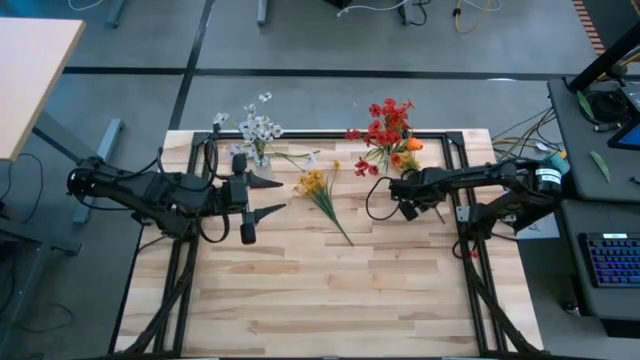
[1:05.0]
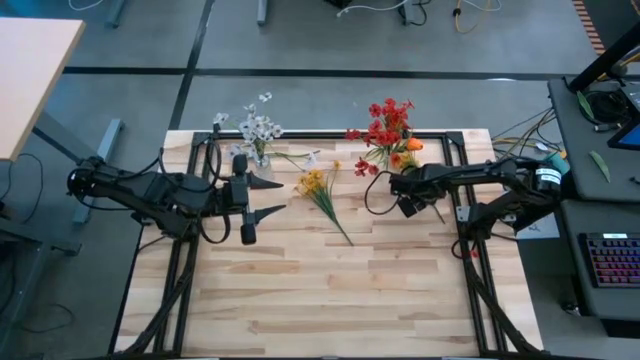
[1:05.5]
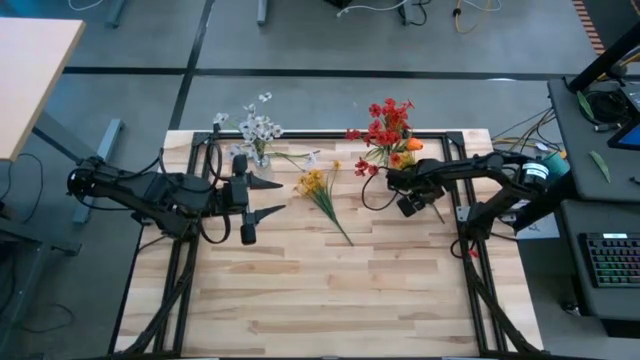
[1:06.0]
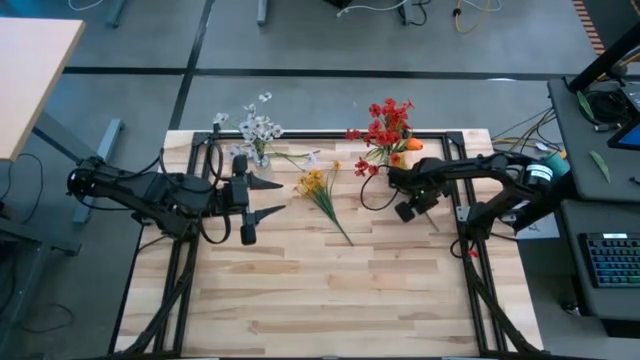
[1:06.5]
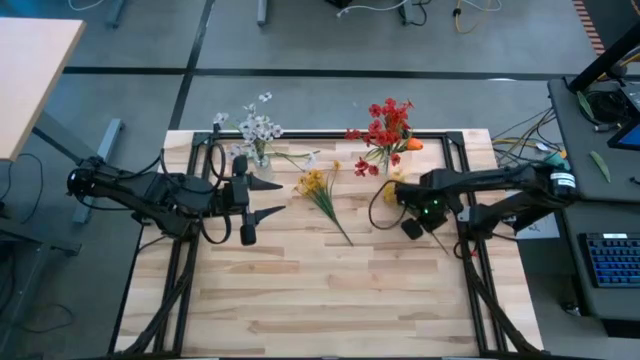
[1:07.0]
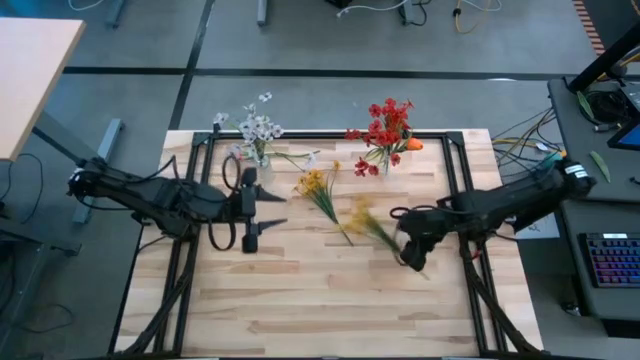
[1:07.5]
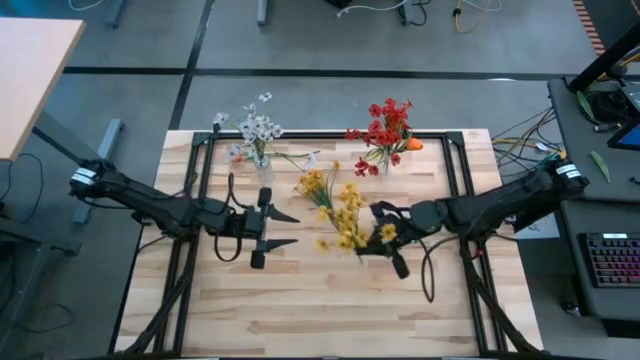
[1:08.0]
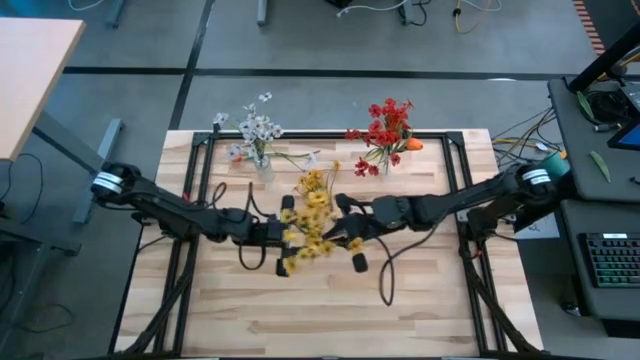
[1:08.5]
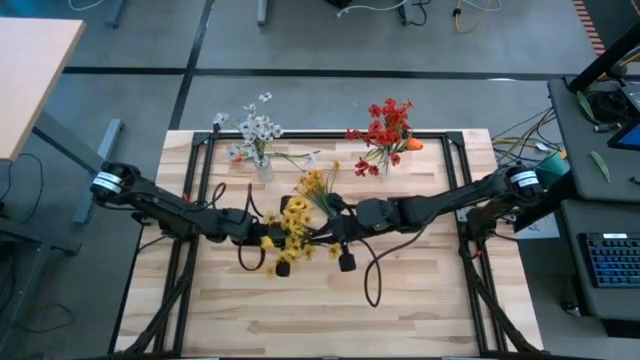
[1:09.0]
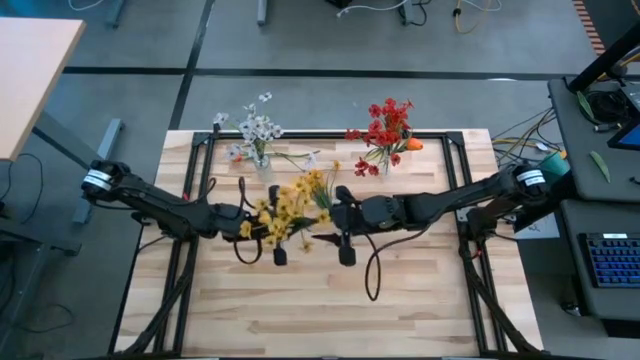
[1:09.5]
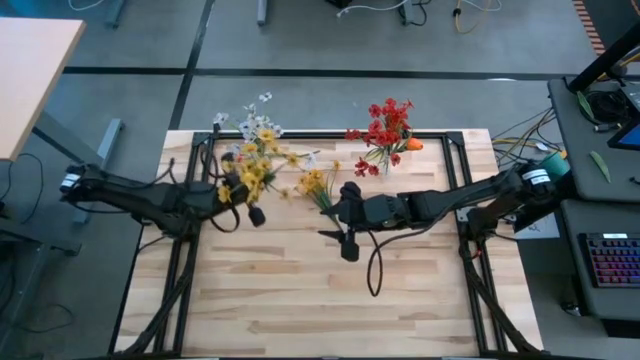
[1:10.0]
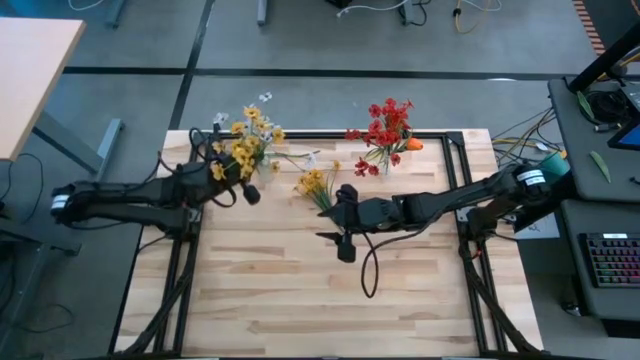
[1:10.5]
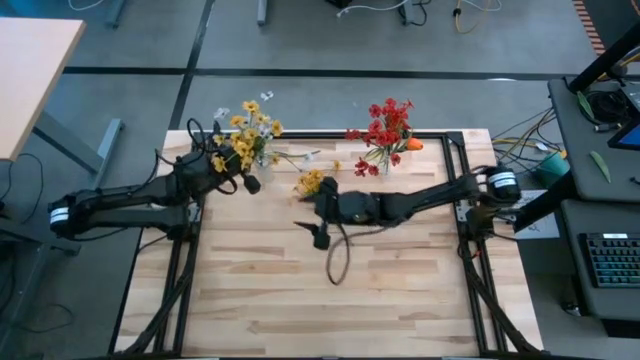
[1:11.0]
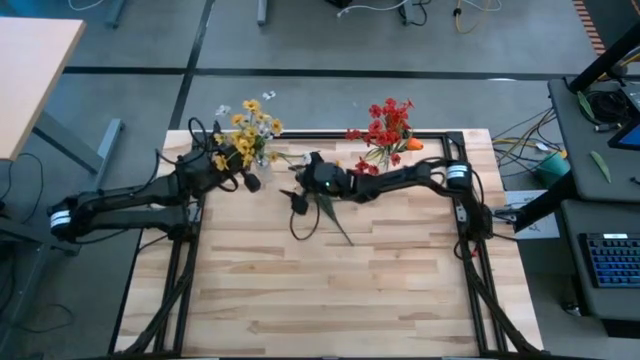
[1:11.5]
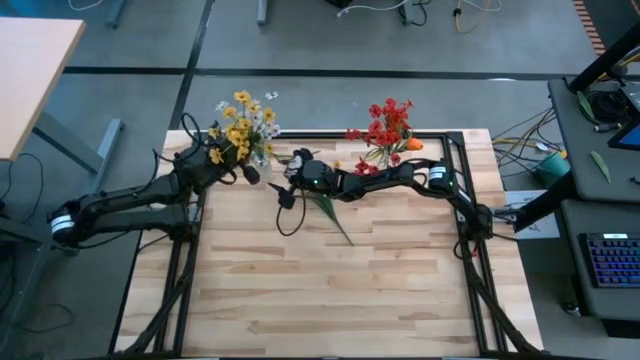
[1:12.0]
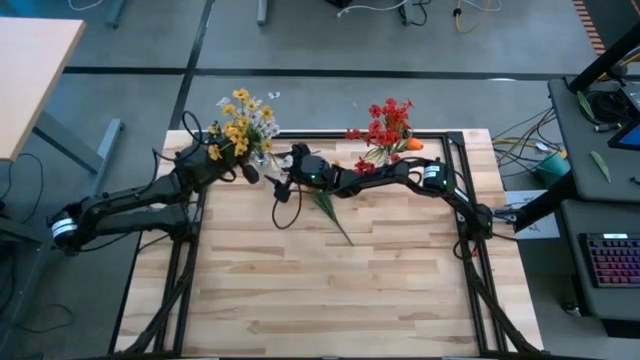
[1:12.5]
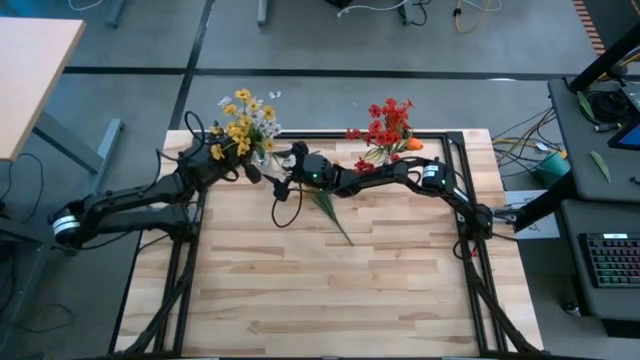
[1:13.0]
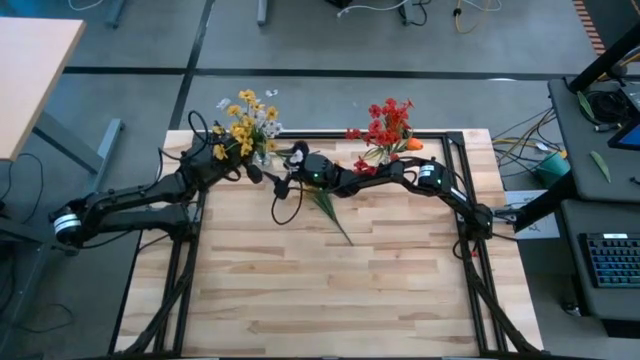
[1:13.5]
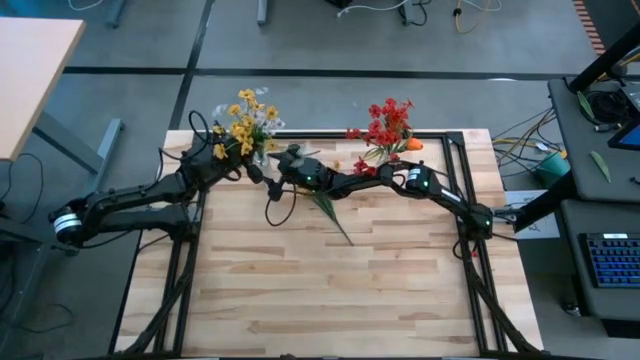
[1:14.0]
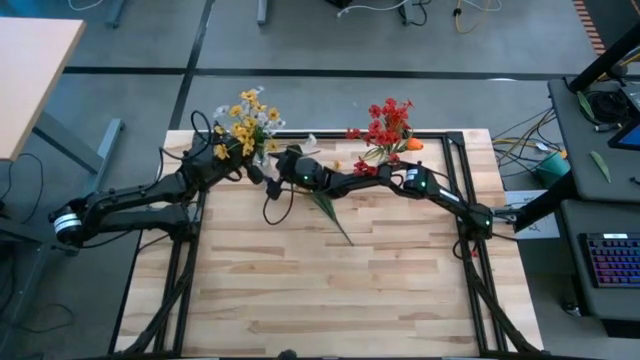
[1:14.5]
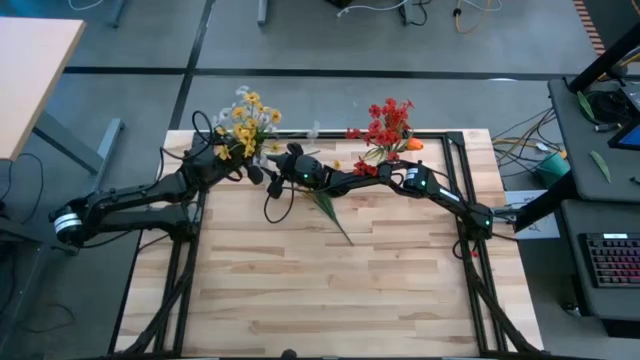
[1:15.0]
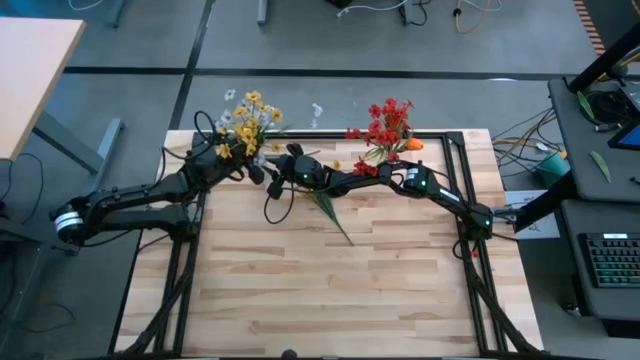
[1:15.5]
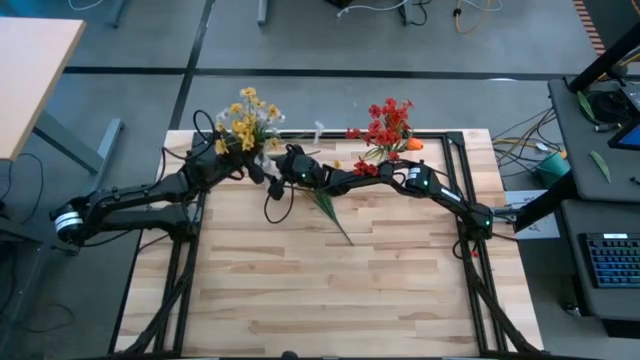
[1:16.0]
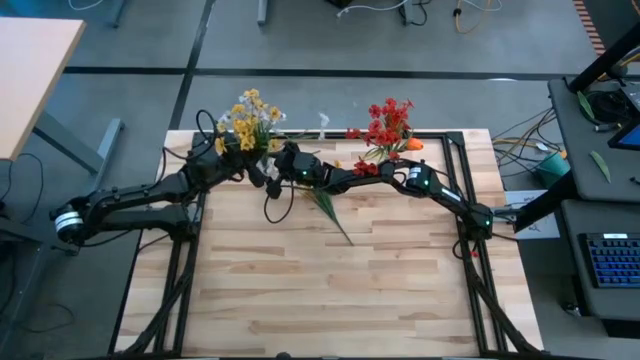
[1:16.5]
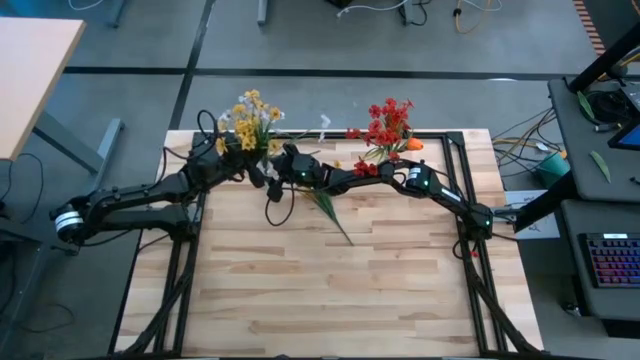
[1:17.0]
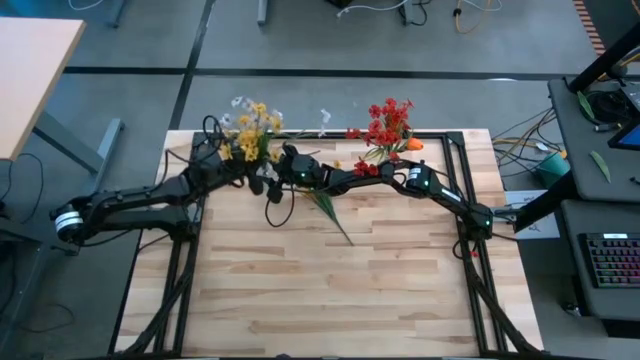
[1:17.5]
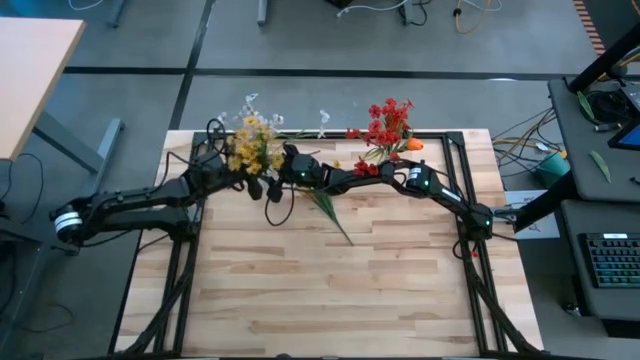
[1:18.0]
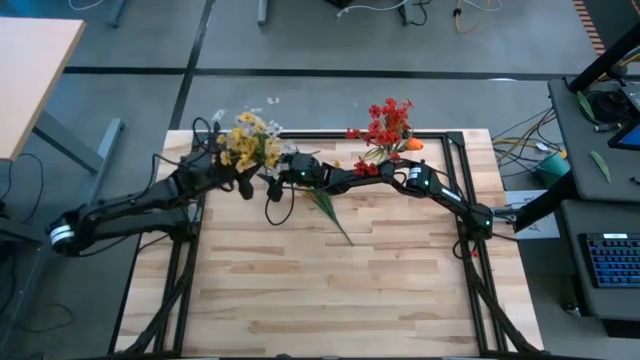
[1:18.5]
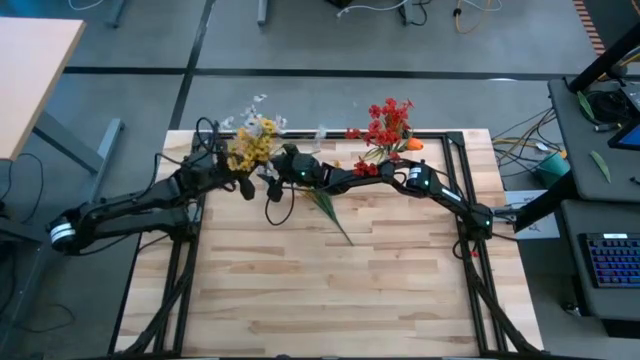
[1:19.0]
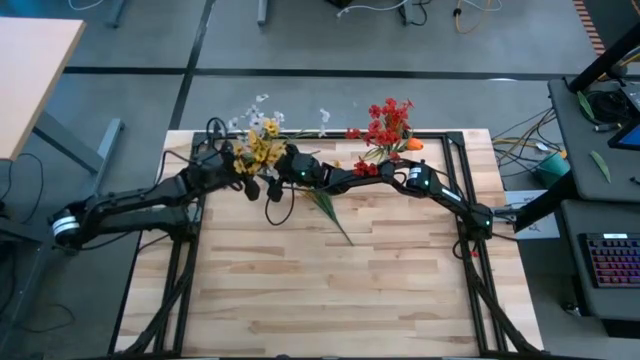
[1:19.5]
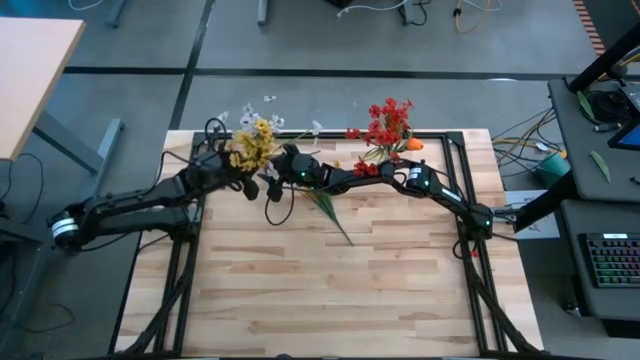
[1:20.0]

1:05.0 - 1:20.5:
Task: Sort flowers into vase by color
Put the right yellow flowers into the left transparent flower vase

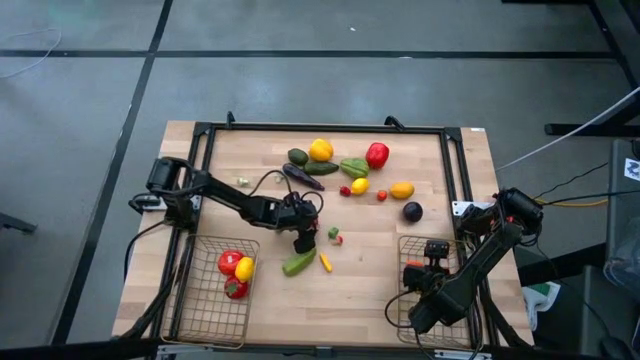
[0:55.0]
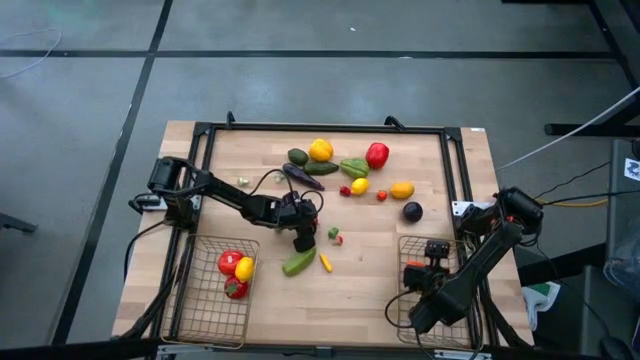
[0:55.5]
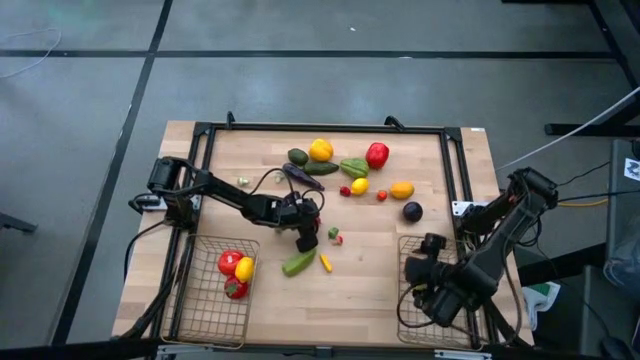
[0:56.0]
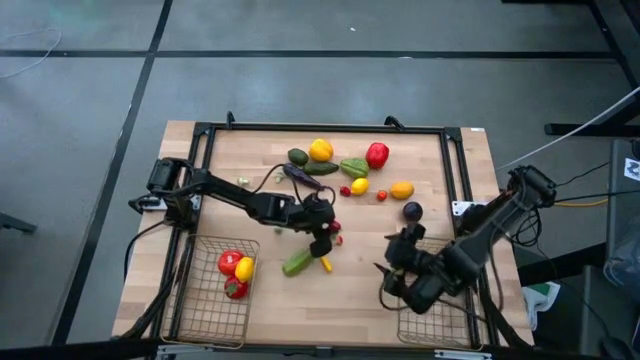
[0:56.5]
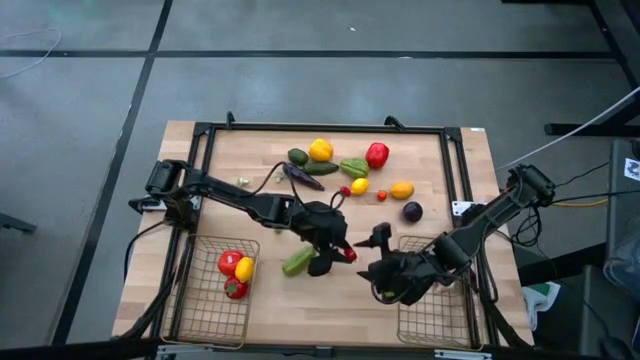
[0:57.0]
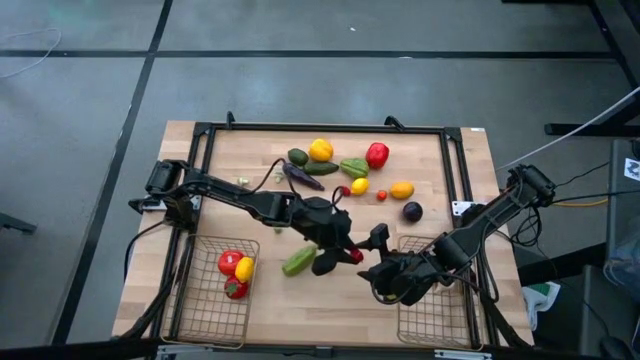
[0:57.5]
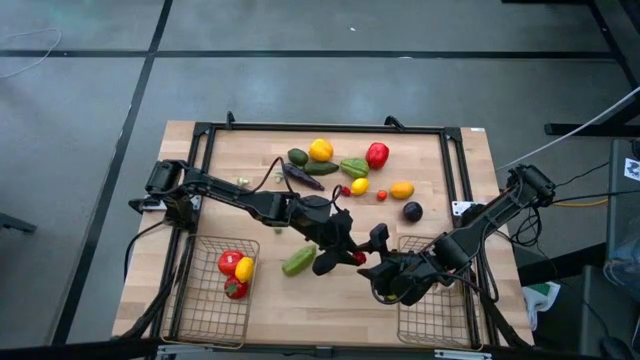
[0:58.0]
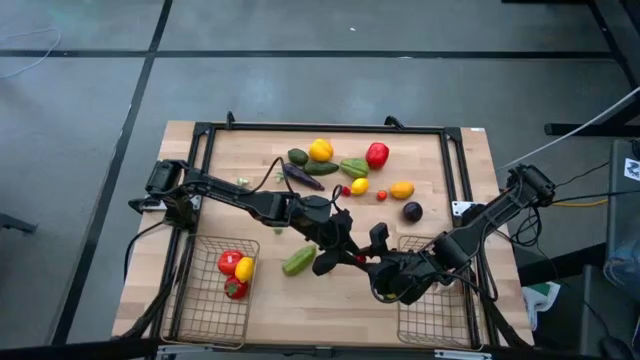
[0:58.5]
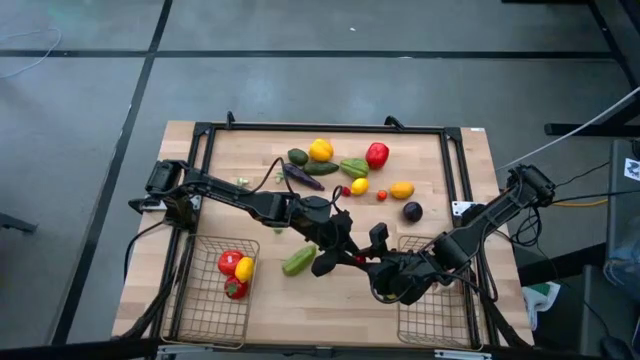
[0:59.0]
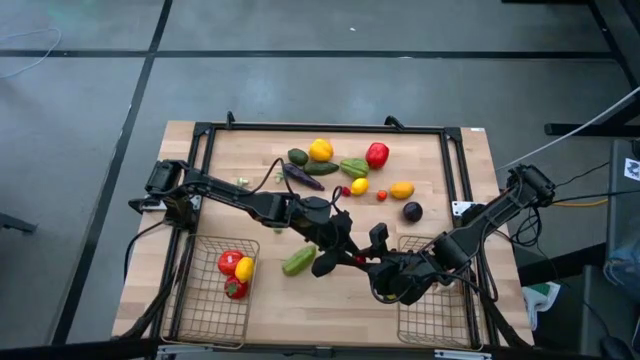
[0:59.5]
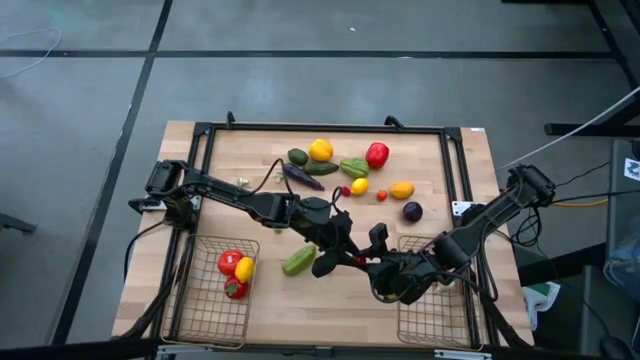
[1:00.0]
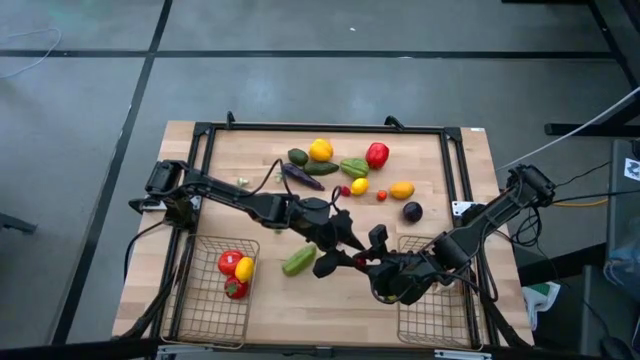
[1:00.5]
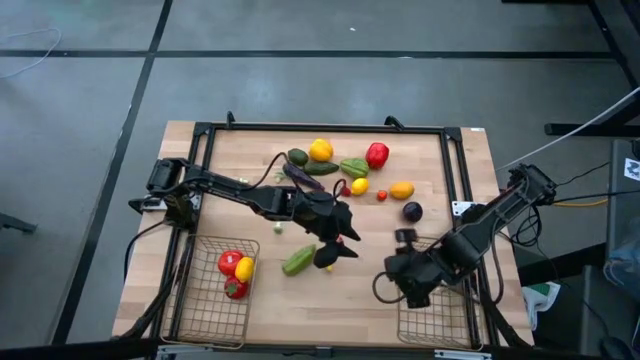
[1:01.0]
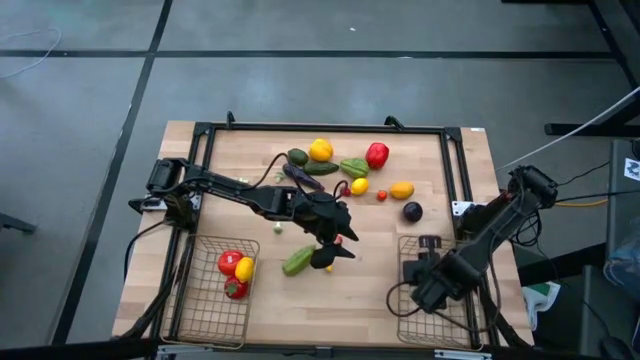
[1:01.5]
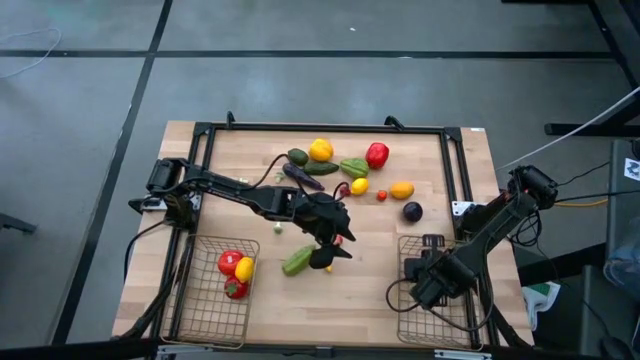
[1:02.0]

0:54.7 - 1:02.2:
Task: Sort produce into baskets
Put the bottom small red chili pepper into the right wire
